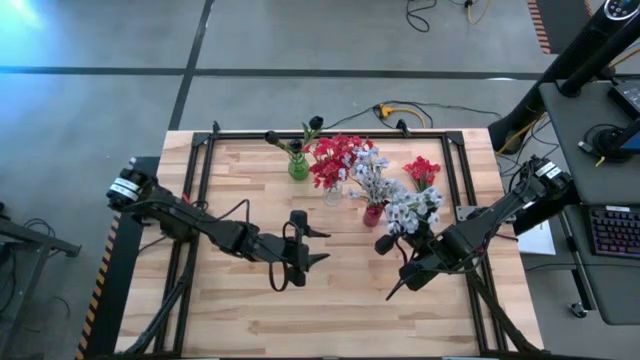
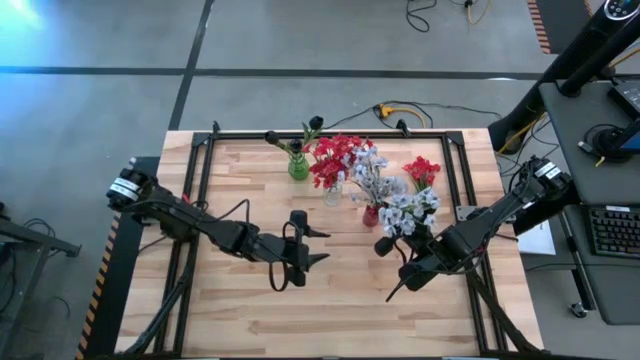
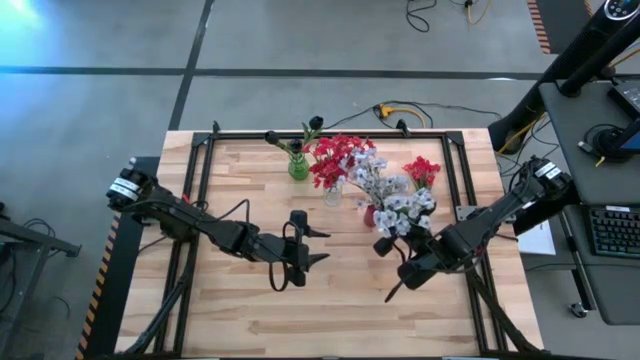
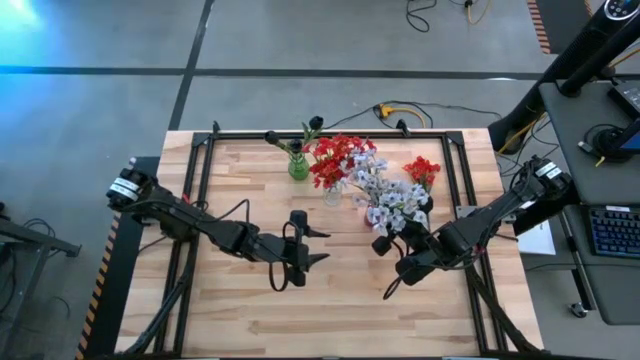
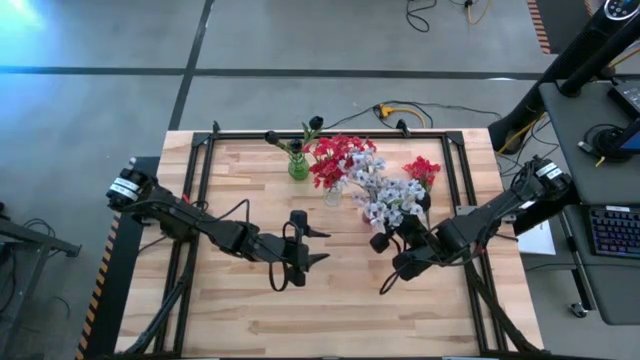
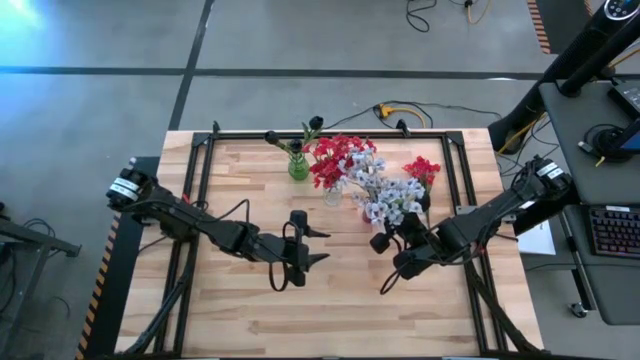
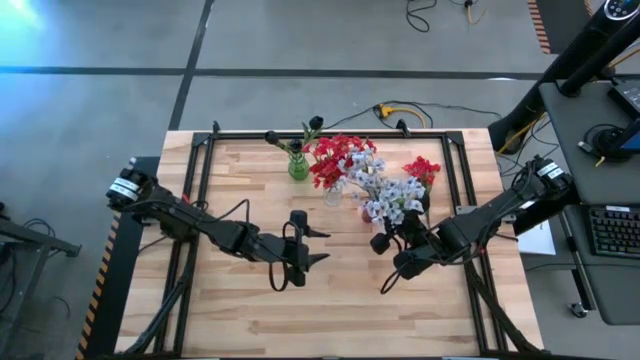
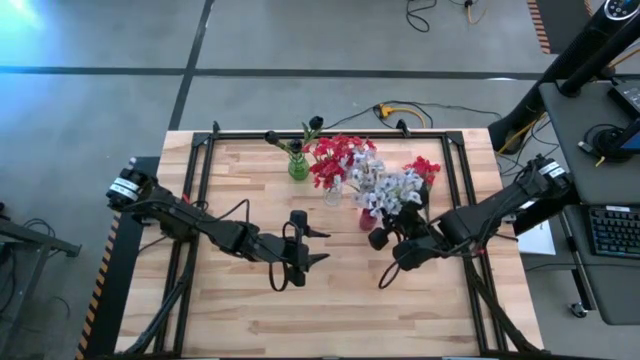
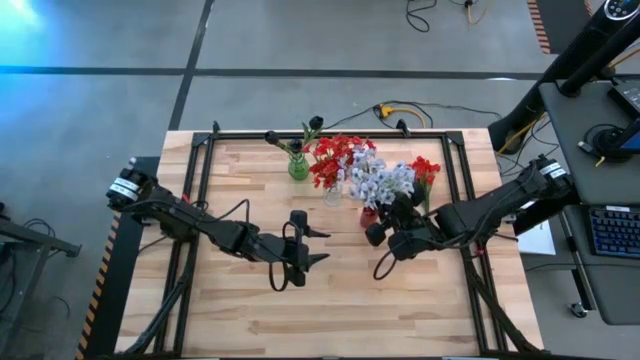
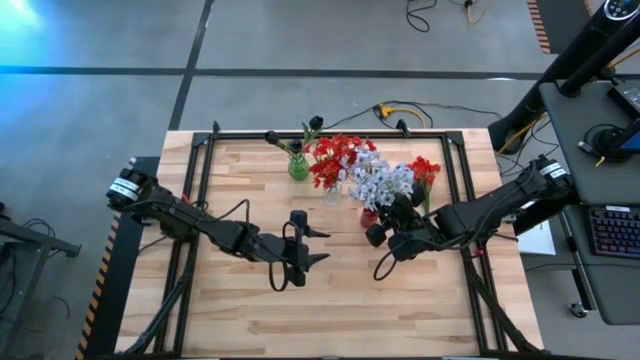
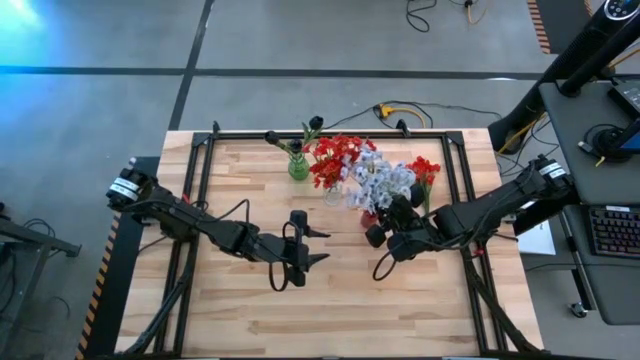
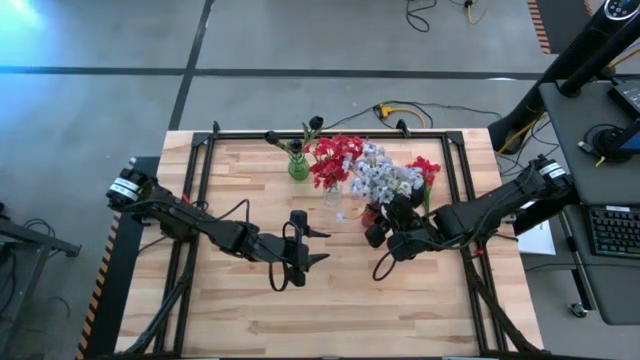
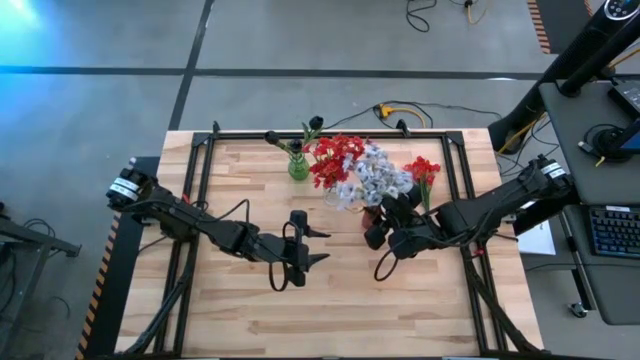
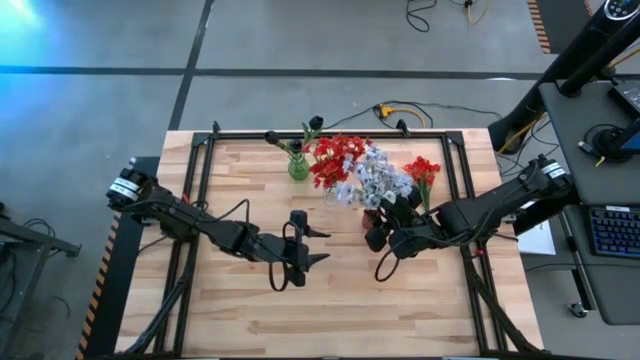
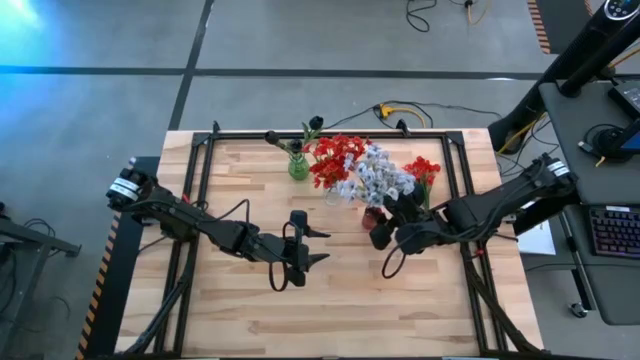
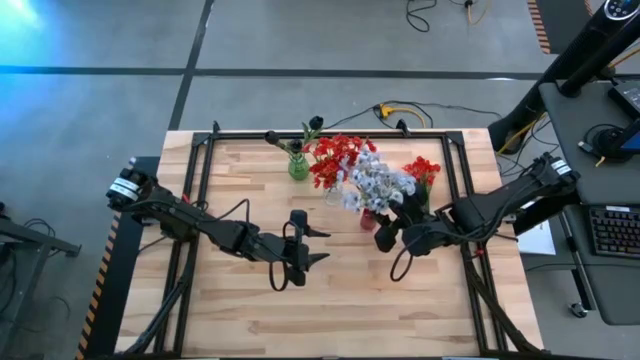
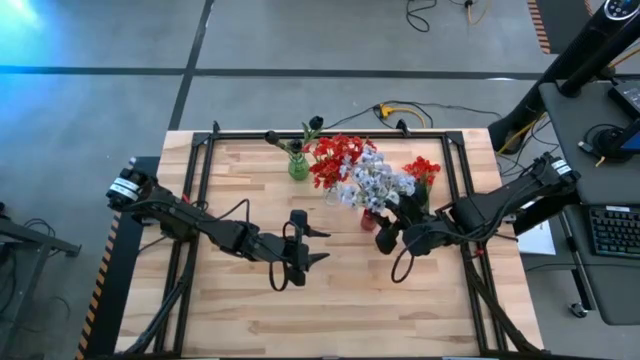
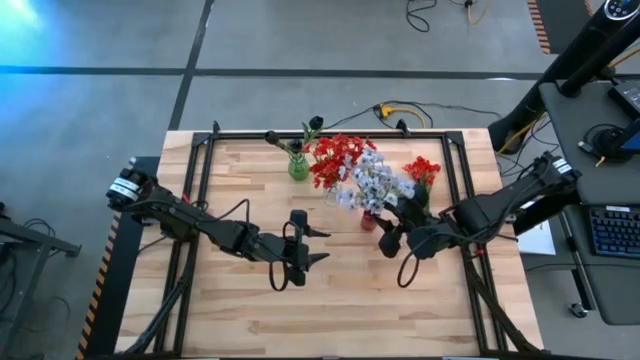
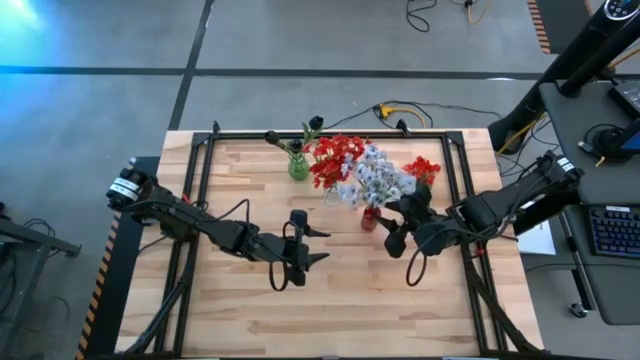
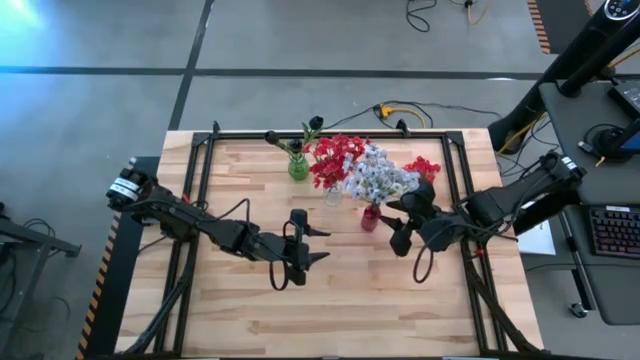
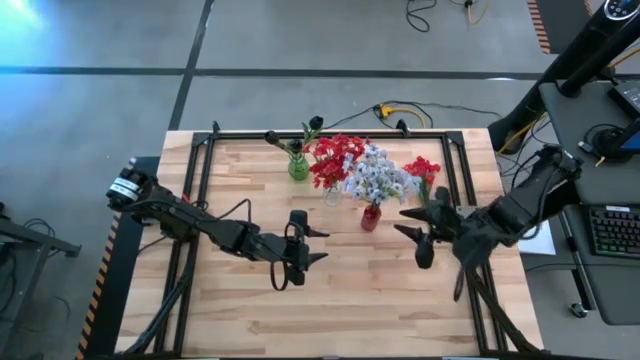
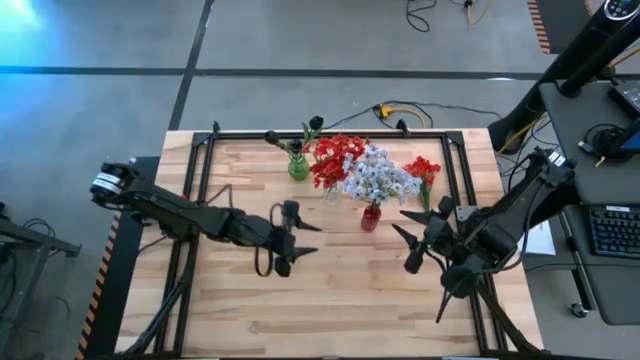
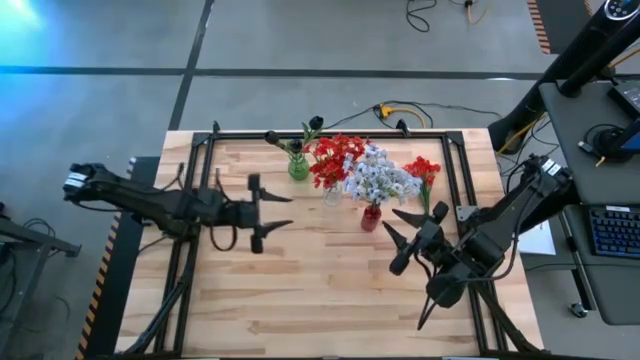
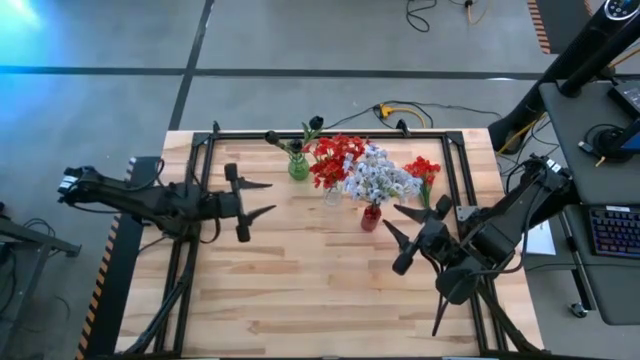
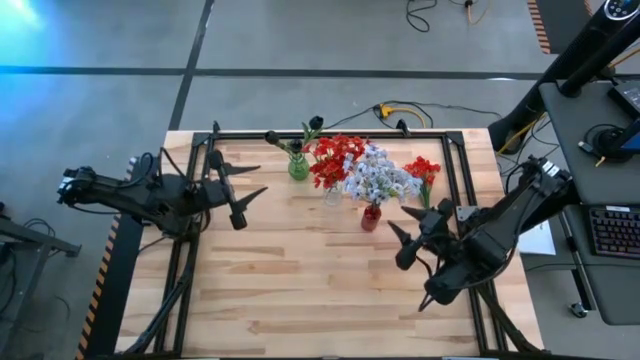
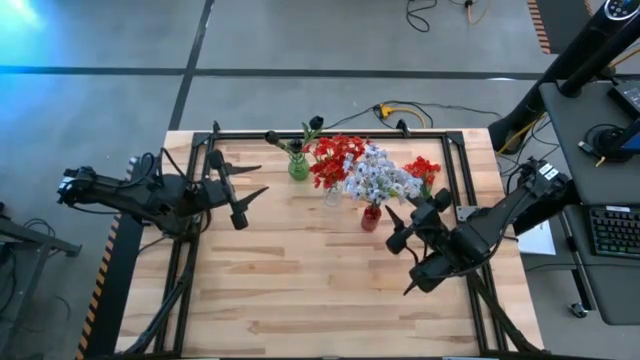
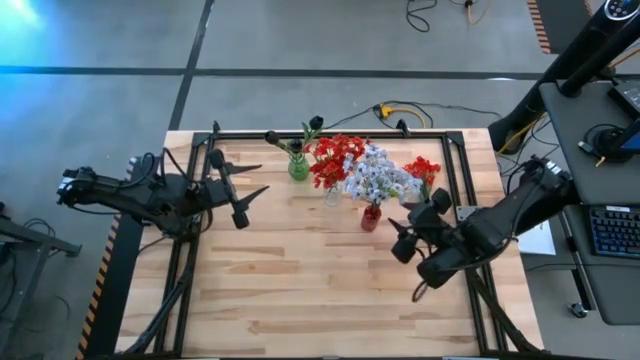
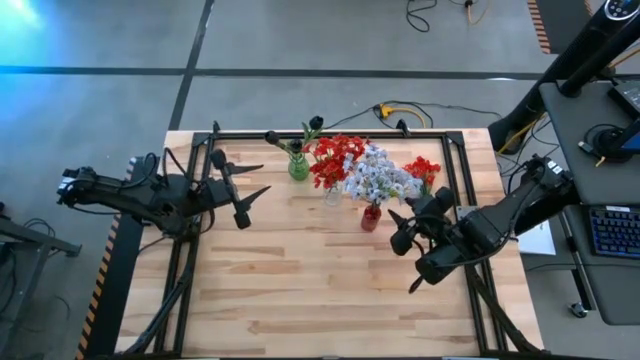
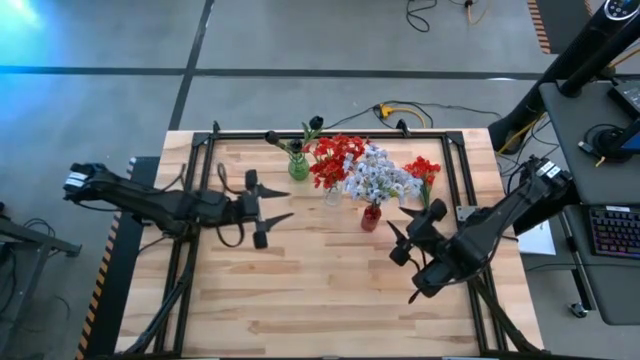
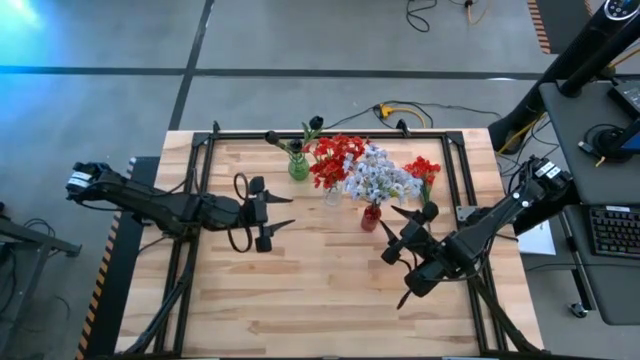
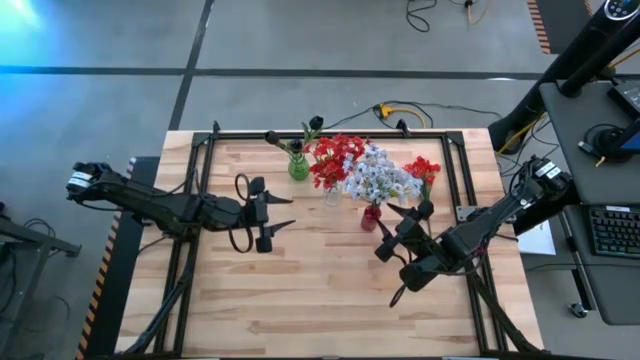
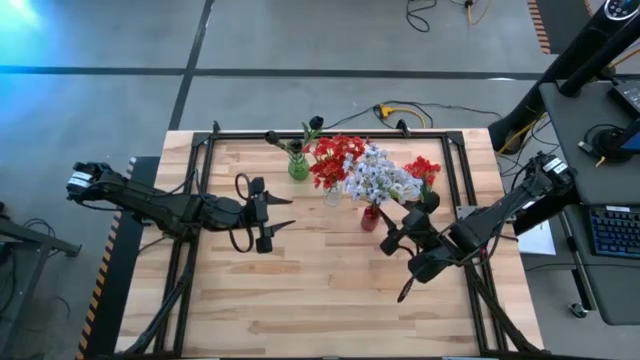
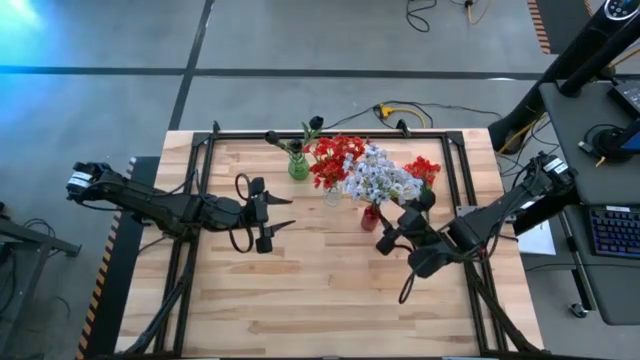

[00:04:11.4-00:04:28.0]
Task: Sort flowers into vase by color
Put the white flowers into the red vase

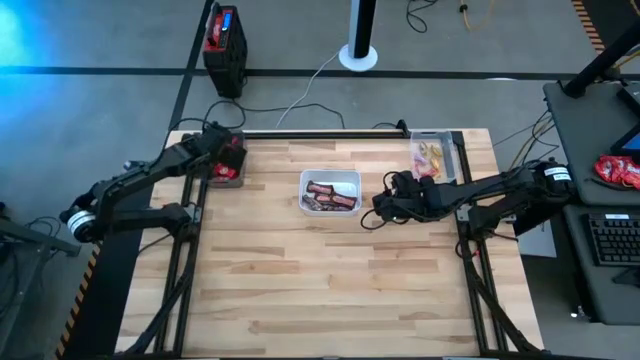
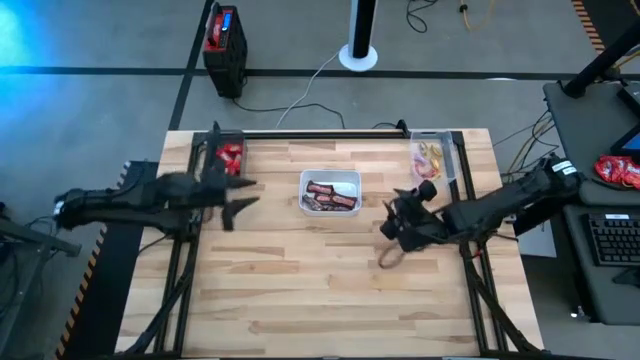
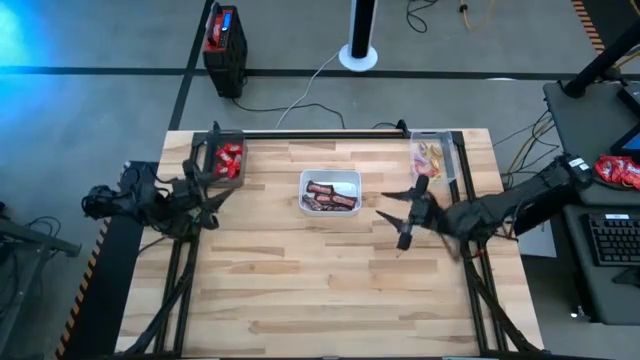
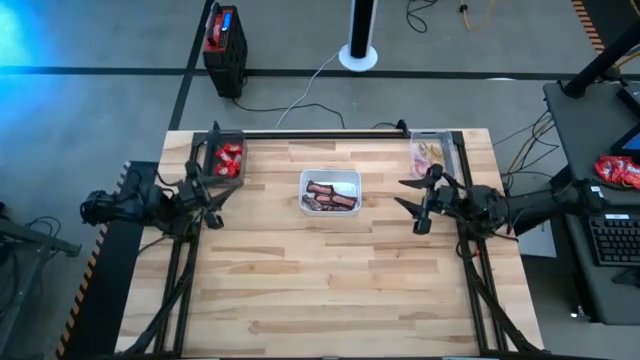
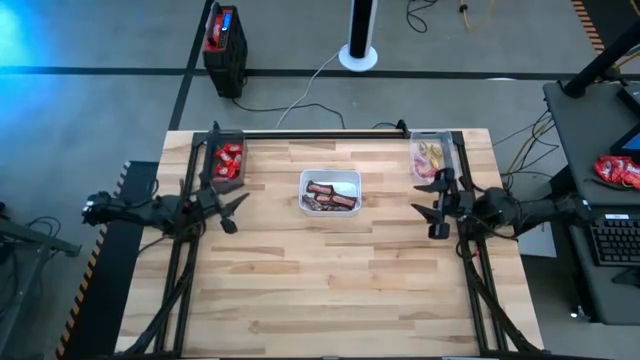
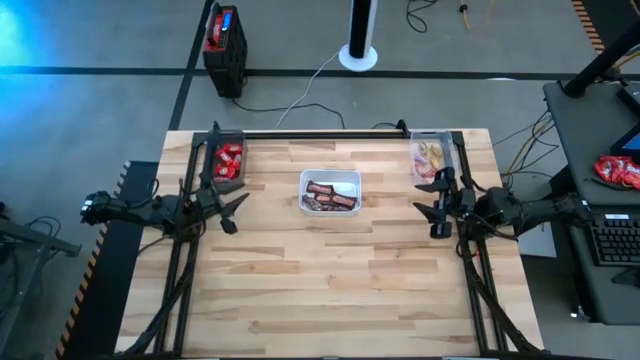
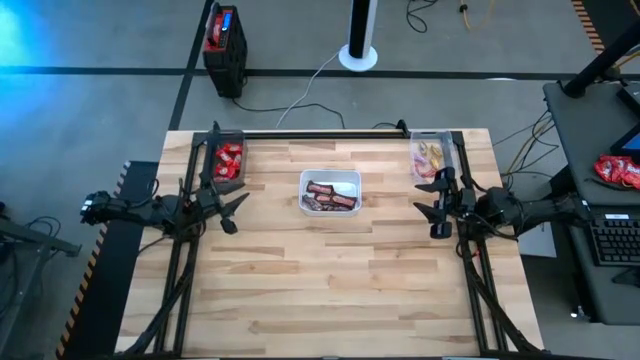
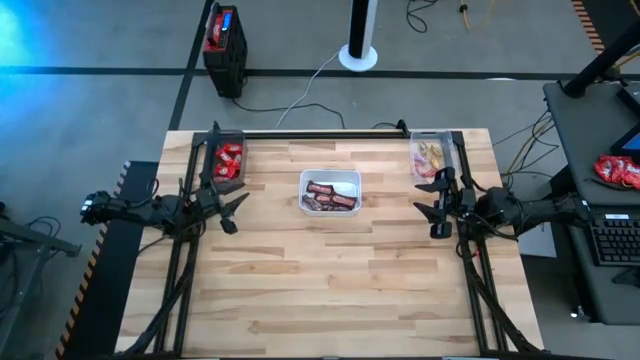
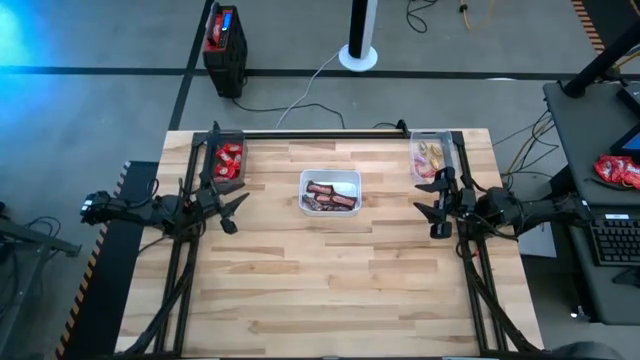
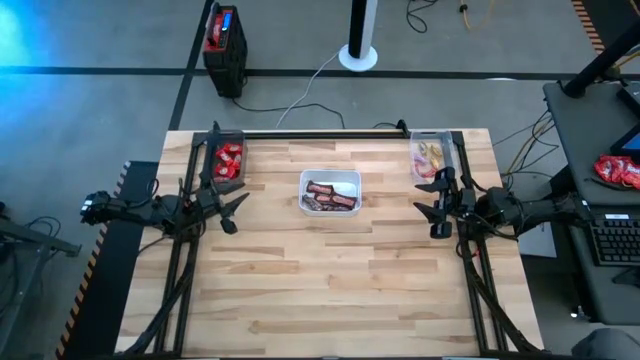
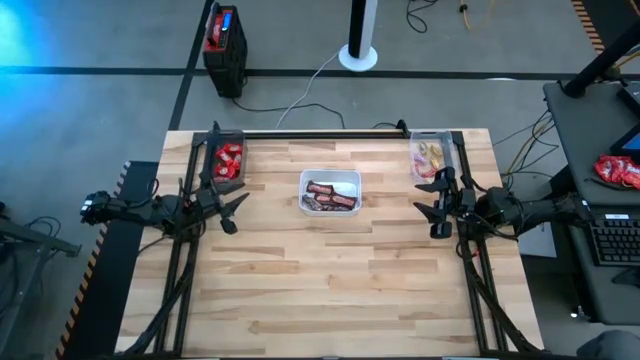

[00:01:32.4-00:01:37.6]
Task: Sort candy by brand, put in halloween buckets
Return to Home Position
